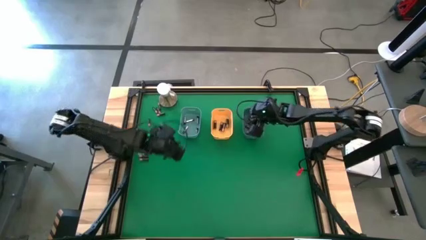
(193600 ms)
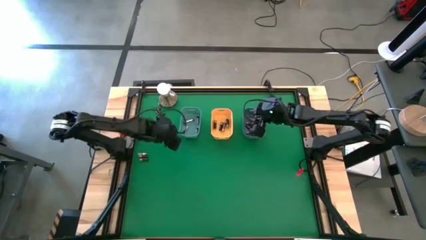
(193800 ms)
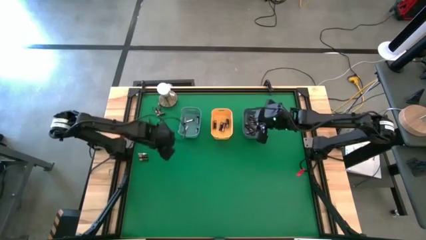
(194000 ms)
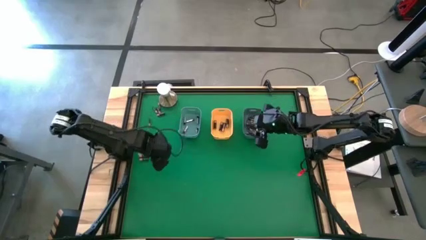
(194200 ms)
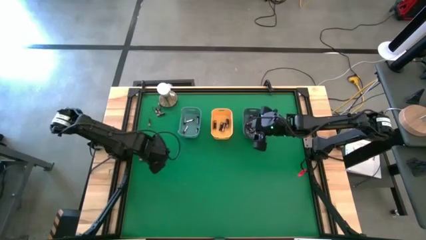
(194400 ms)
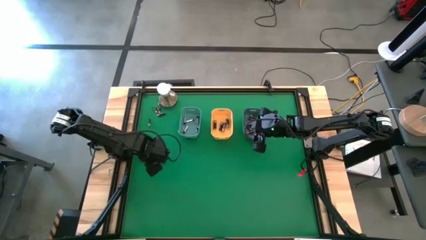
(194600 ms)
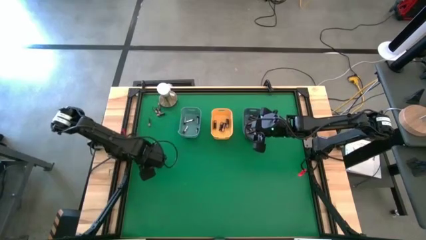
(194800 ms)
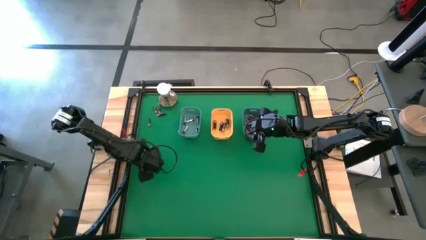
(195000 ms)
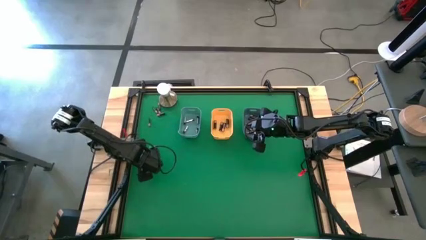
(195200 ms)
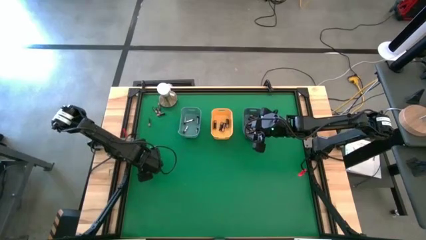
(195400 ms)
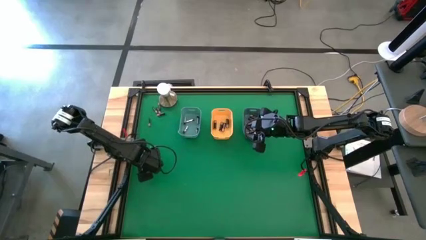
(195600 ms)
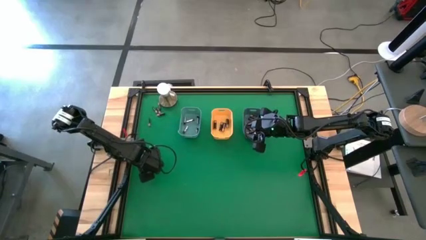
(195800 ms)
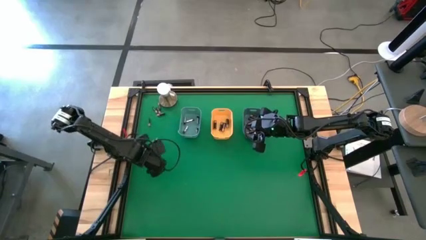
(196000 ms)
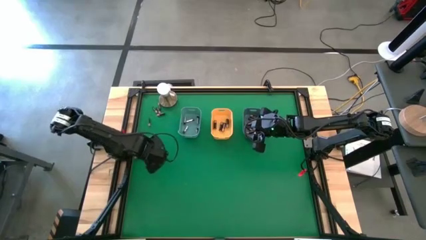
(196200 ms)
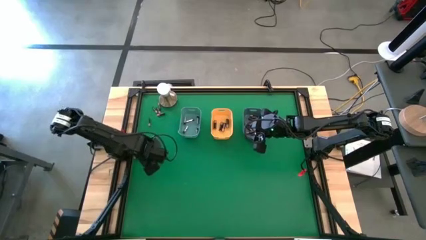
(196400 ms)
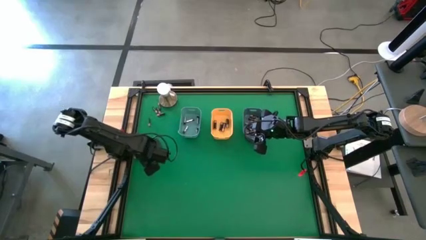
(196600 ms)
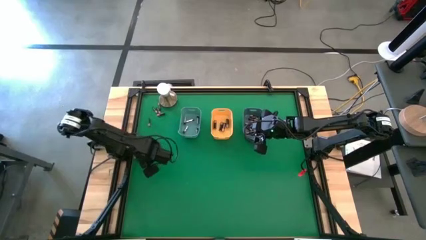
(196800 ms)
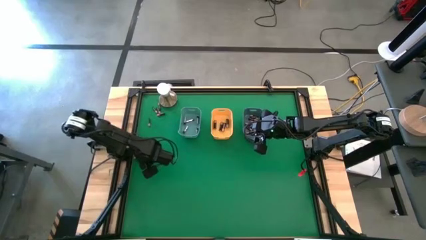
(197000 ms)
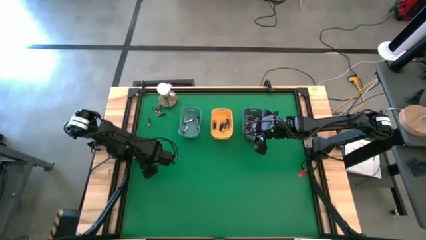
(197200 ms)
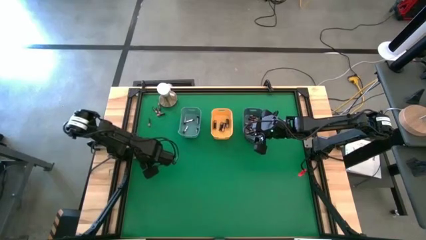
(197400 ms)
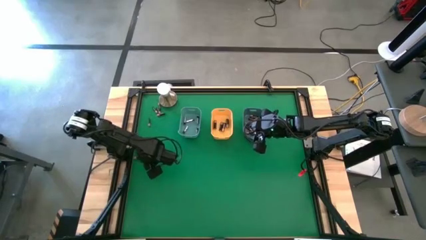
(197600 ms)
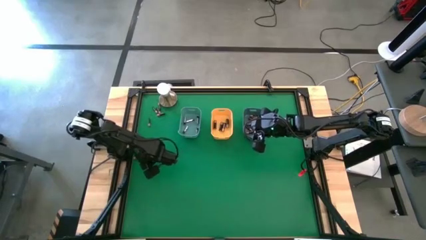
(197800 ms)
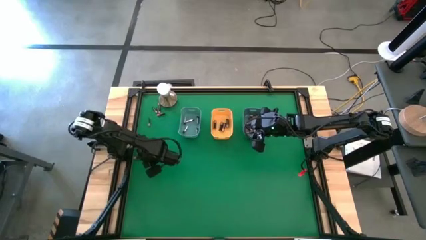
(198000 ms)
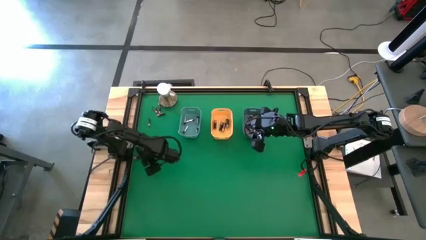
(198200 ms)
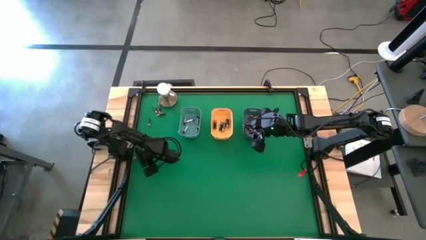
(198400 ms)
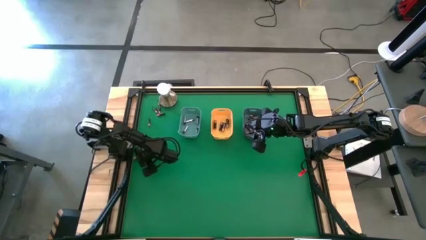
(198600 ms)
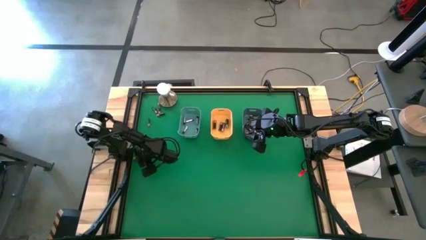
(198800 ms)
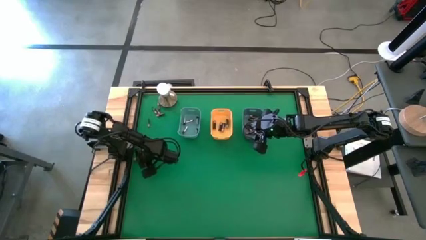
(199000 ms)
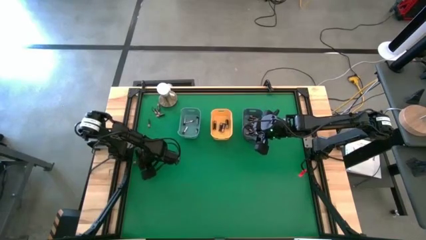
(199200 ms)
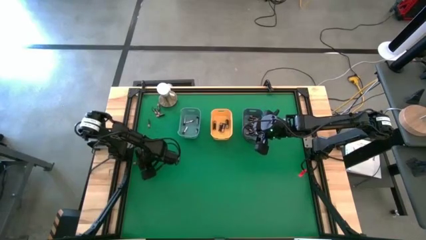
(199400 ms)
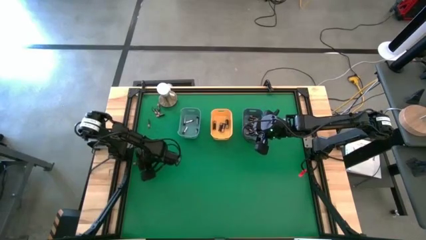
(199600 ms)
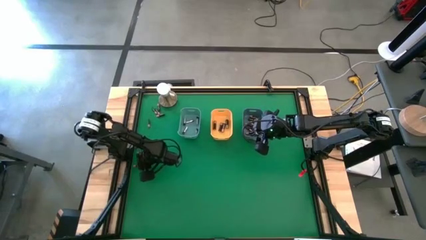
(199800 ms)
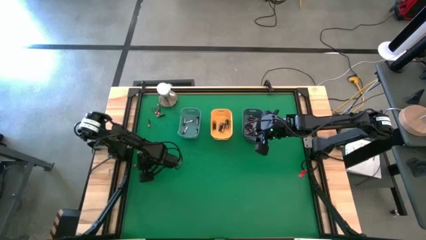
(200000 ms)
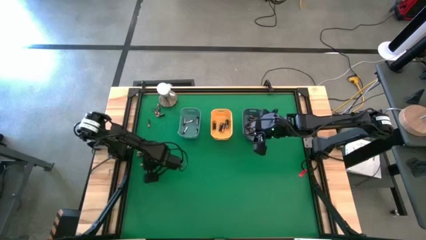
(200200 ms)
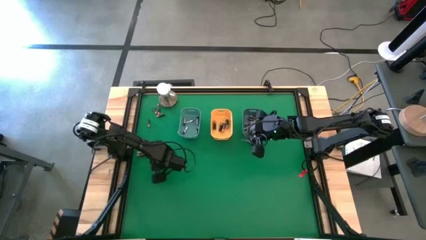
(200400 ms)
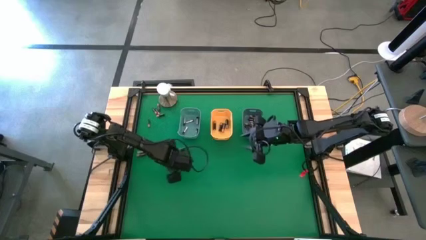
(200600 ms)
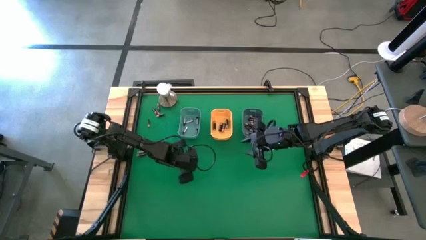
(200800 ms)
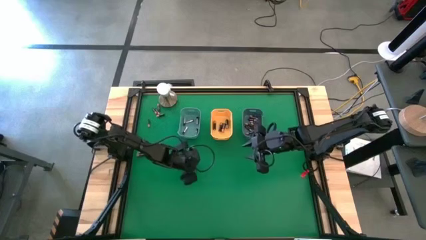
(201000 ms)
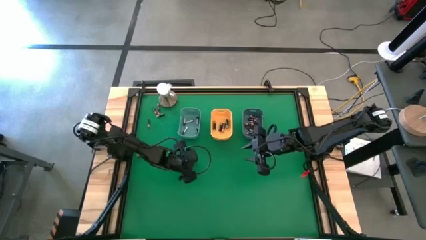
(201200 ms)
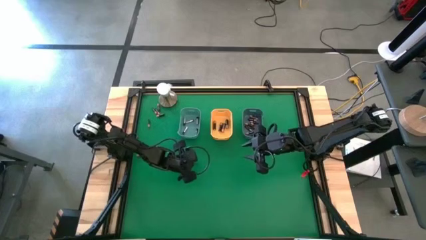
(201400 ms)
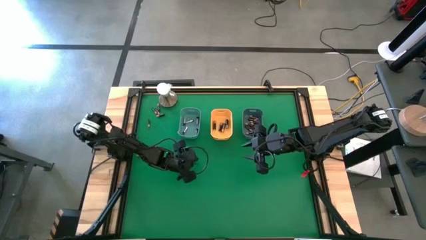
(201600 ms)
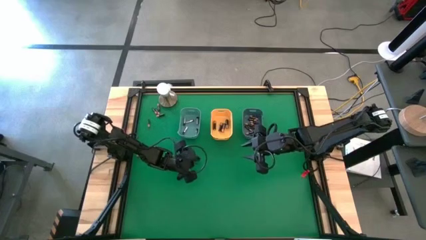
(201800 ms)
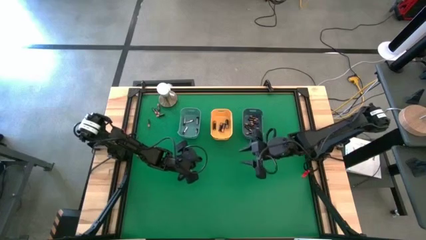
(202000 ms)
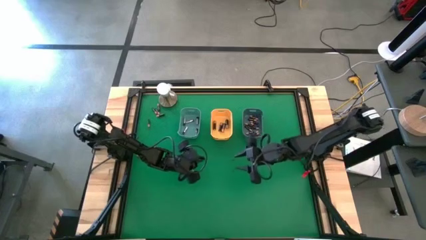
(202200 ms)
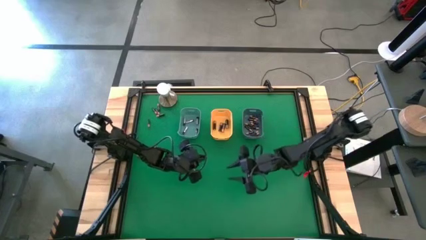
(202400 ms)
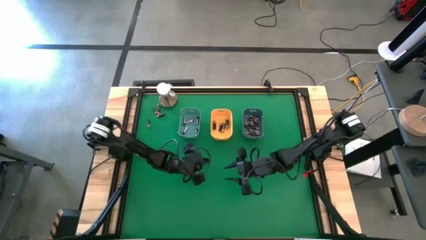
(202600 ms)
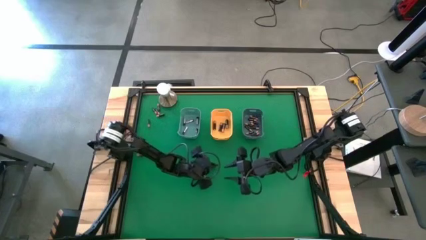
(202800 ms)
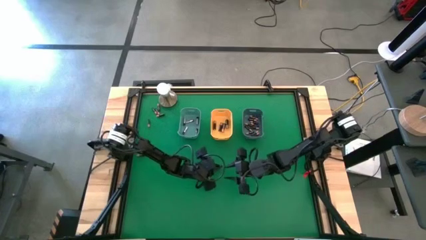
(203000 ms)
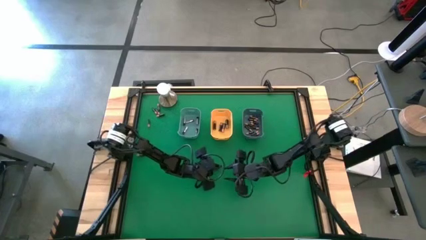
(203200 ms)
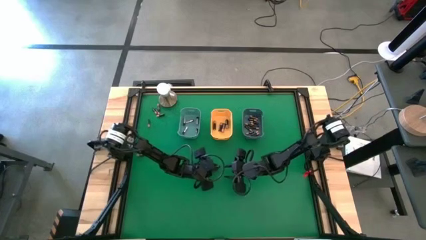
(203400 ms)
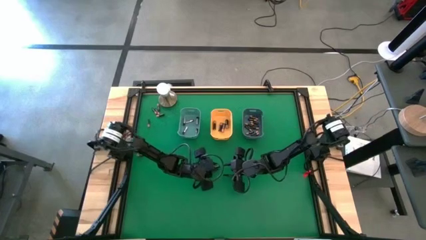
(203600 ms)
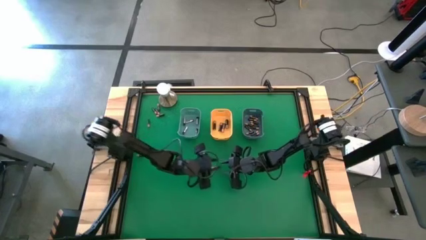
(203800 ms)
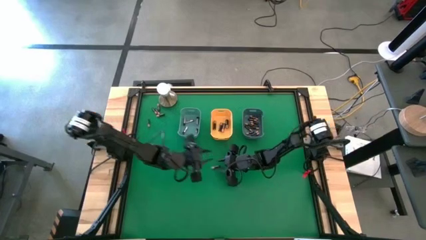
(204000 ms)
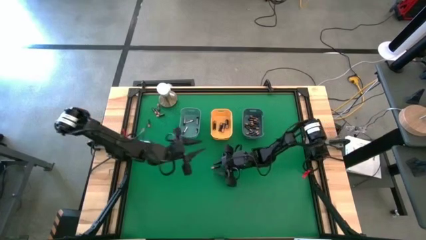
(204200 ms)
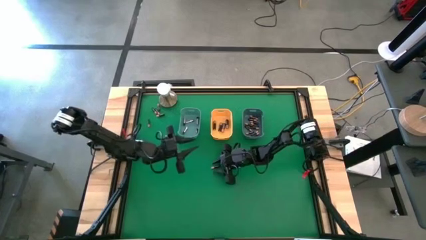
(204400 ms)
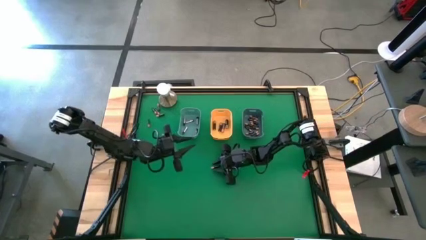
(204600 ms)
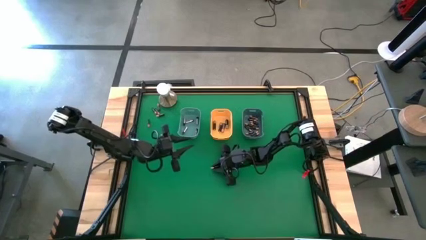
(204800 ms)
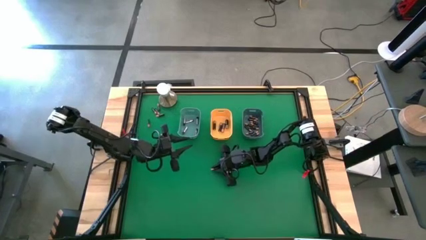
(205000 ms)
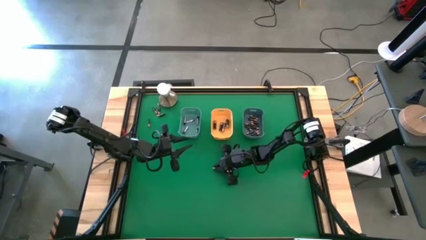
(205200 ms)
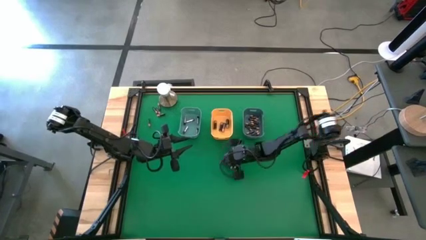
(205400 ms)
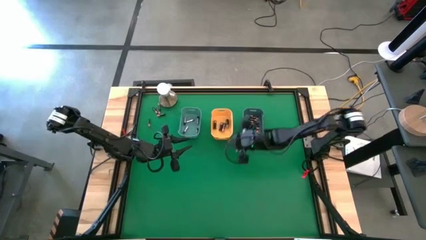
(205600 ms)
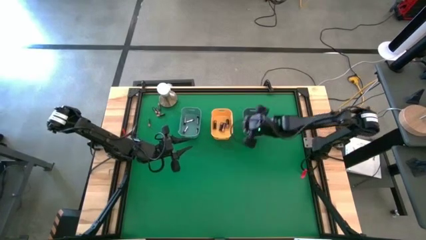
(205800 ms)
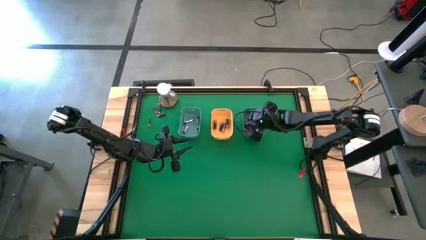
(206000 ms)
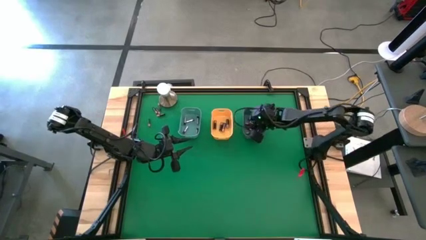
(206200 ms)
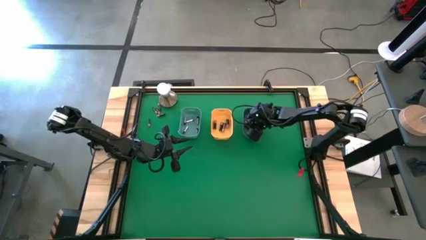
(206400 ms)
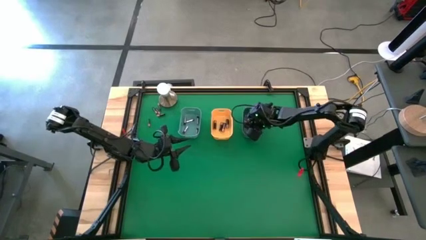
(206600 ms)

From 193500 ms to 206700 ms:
Task: Sort batteries
Put the small black battery into the blue bin
